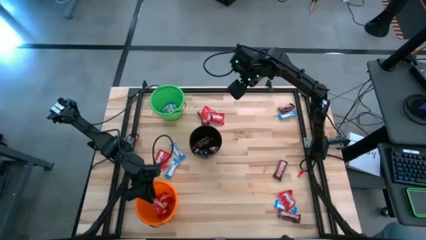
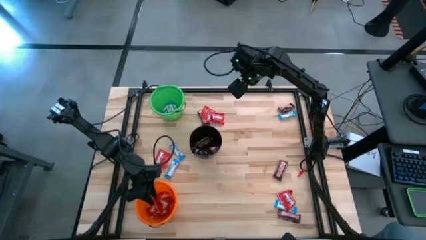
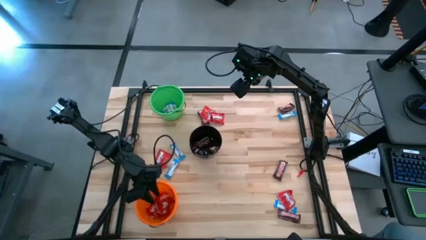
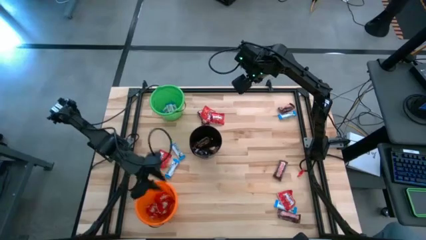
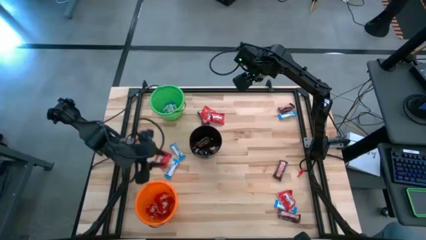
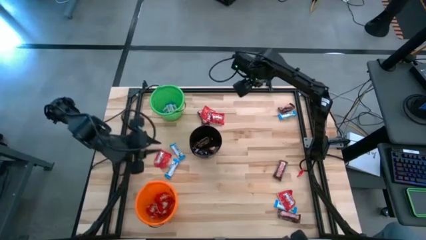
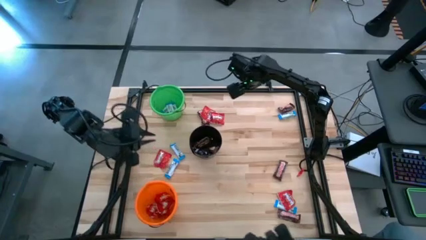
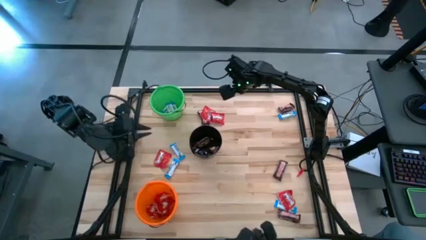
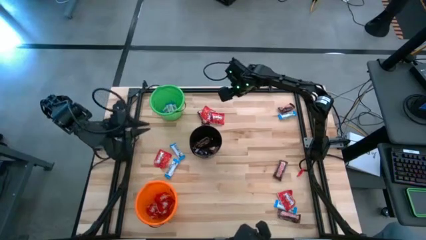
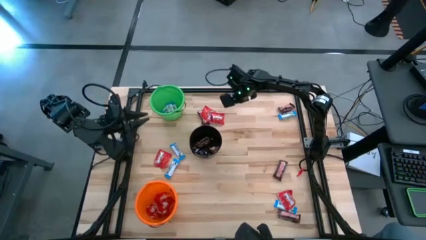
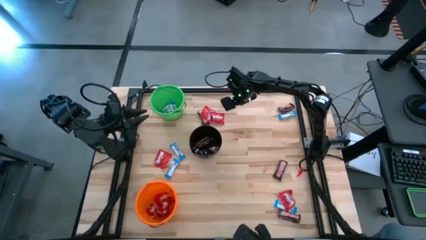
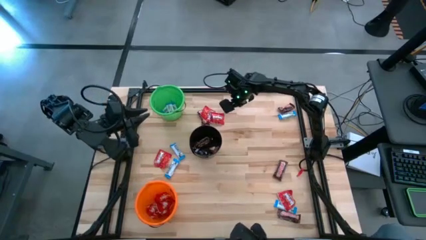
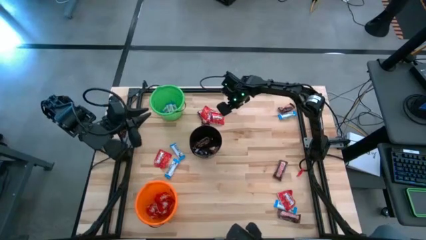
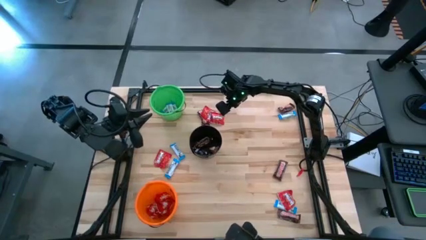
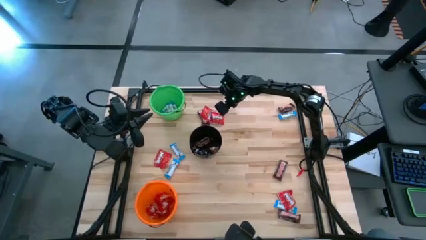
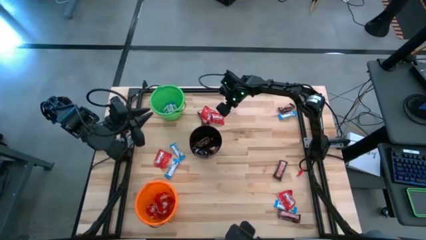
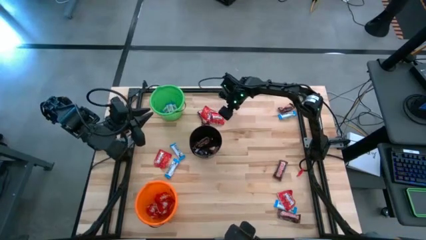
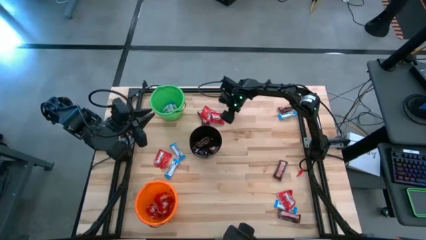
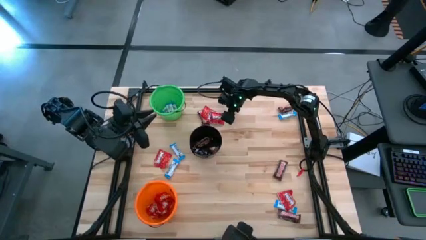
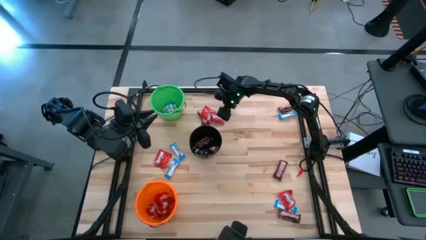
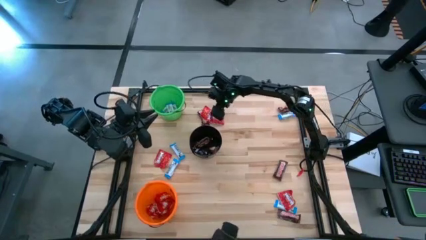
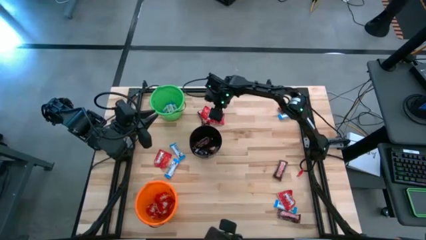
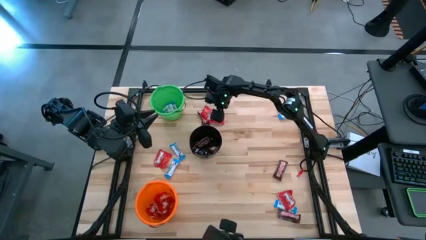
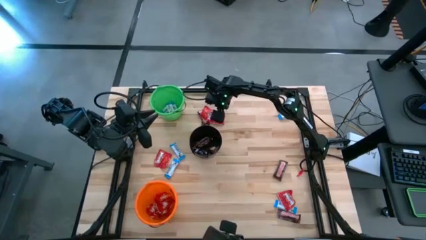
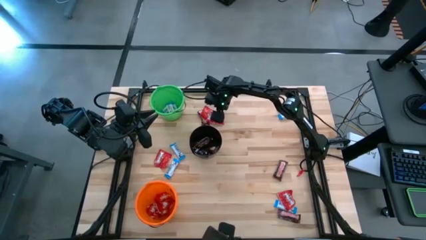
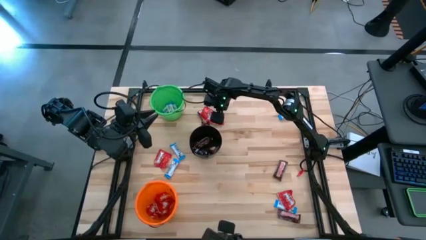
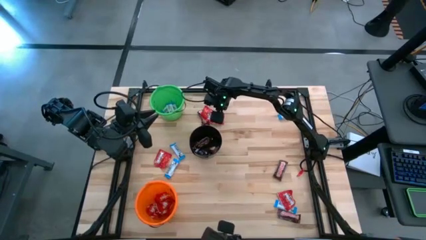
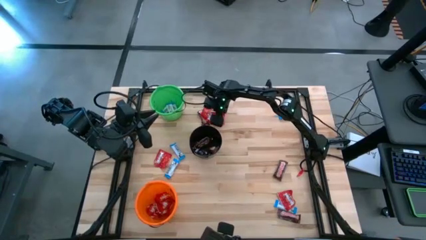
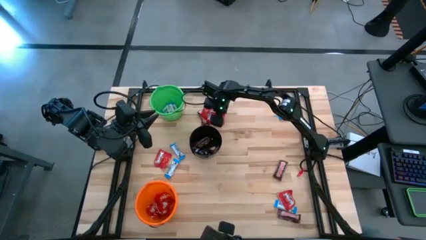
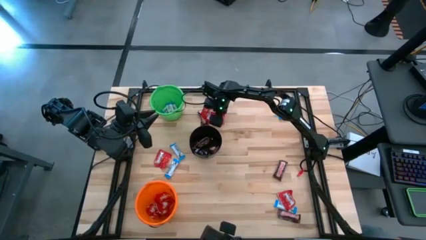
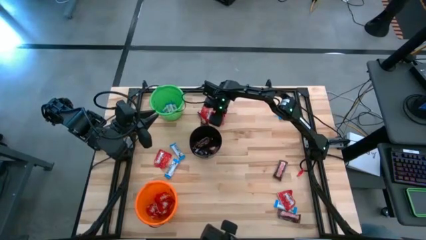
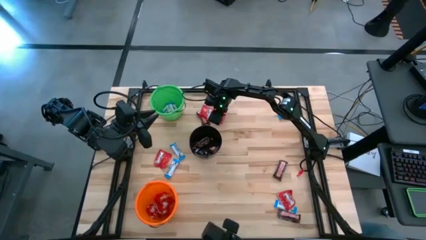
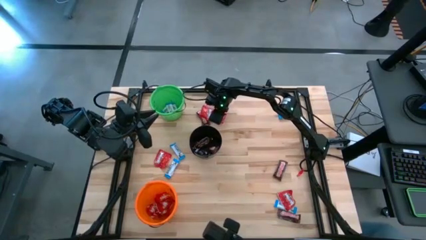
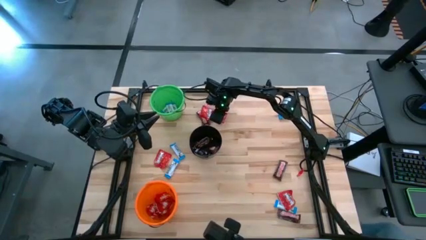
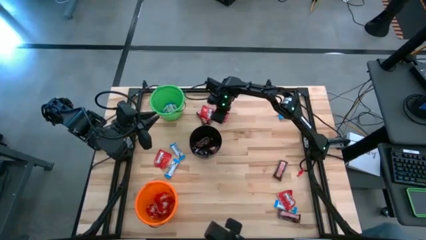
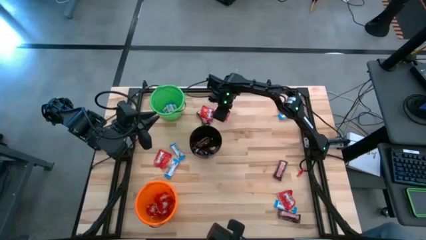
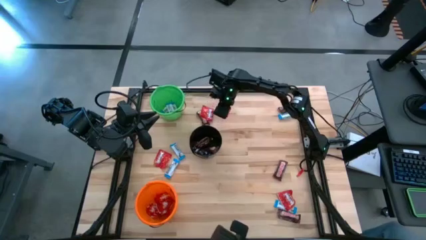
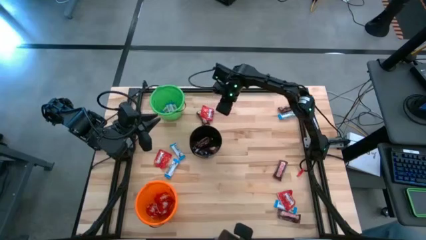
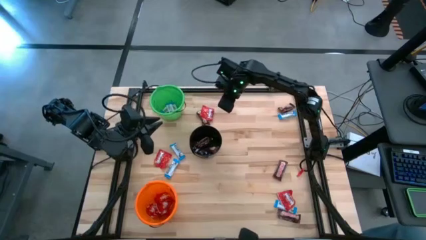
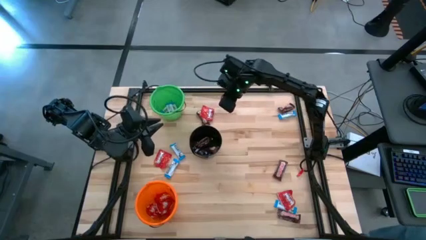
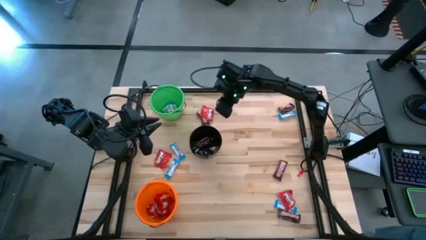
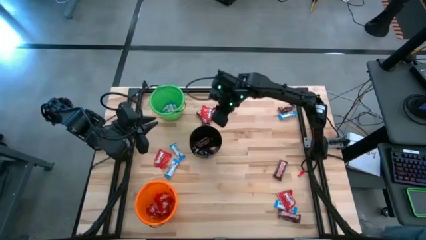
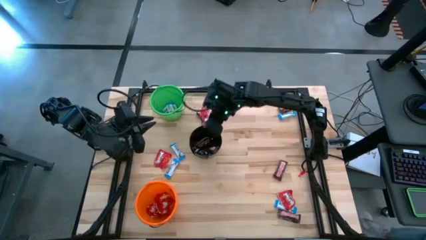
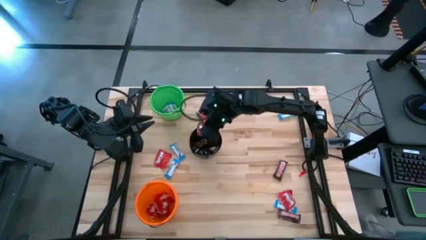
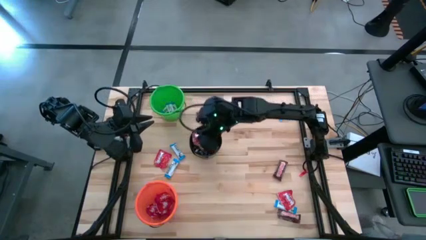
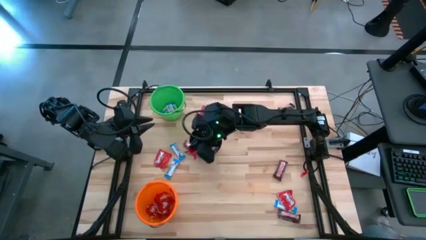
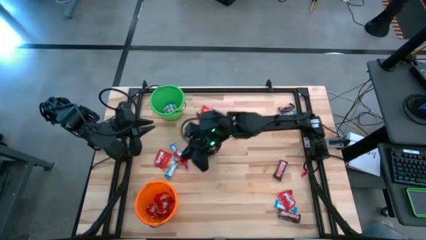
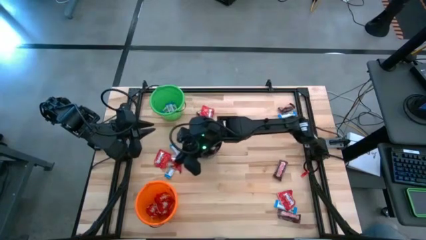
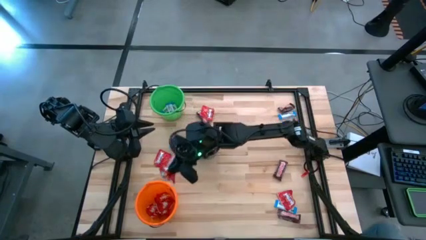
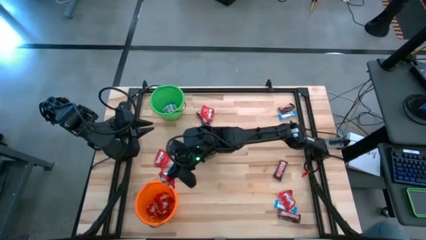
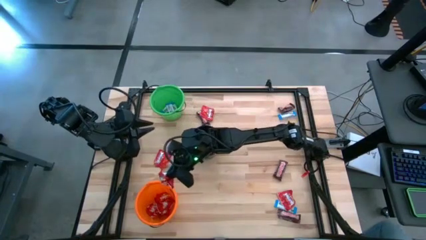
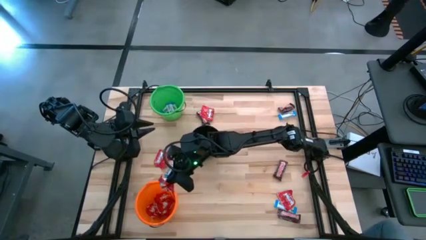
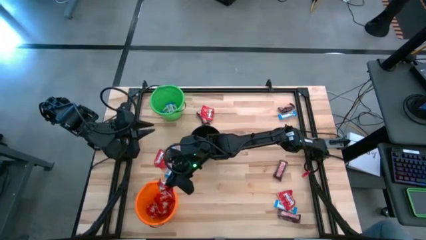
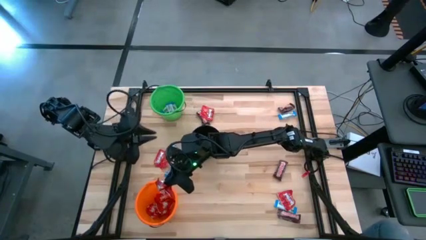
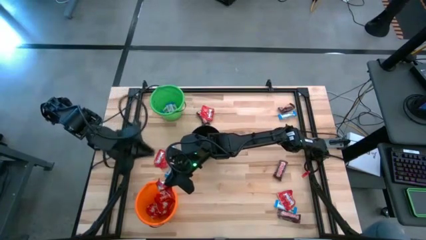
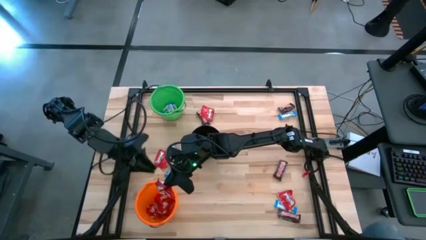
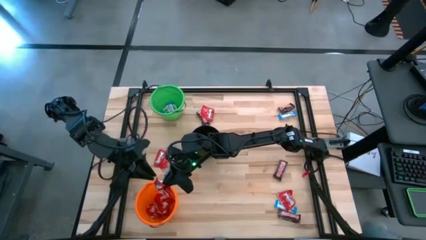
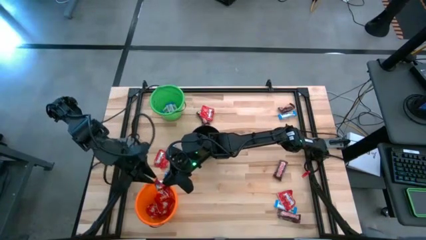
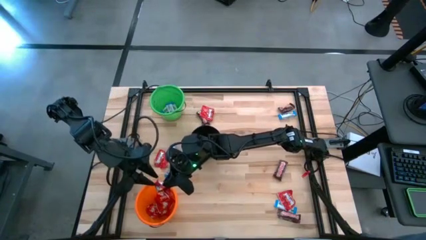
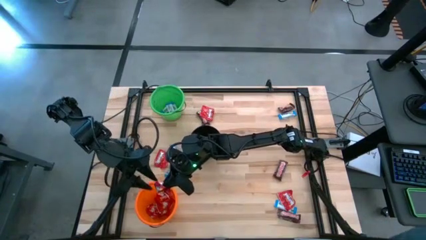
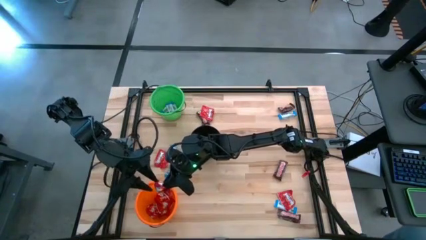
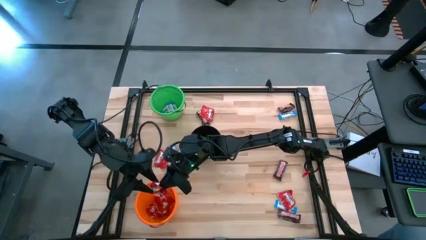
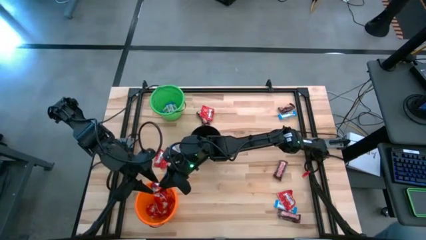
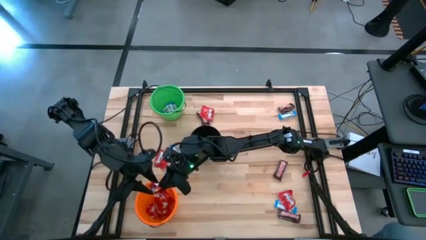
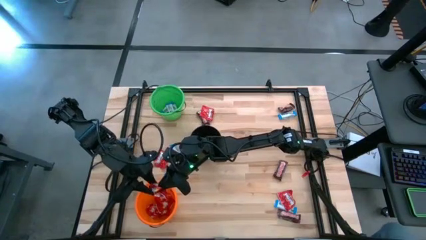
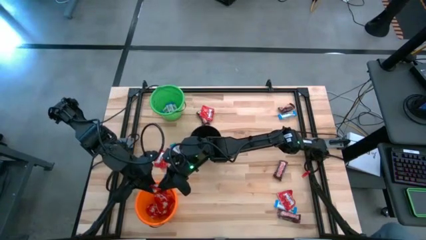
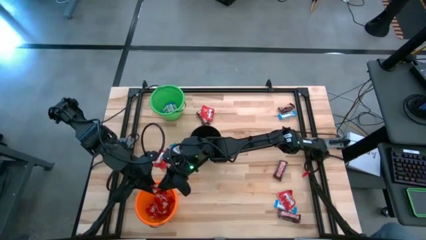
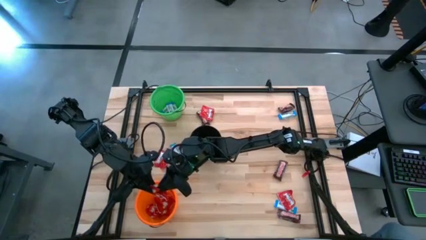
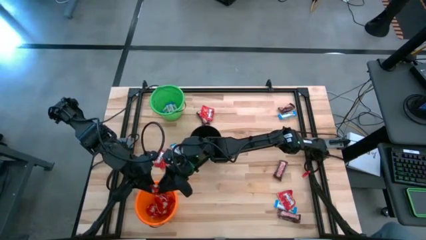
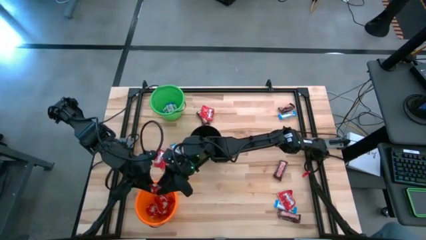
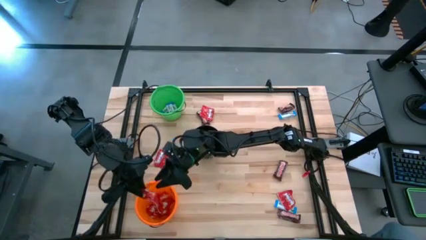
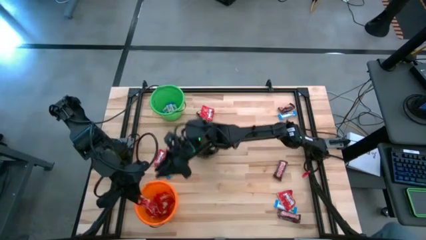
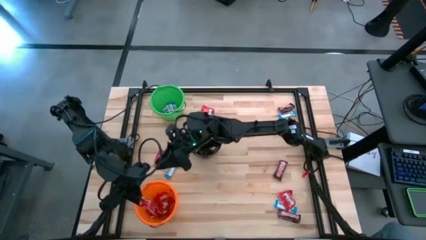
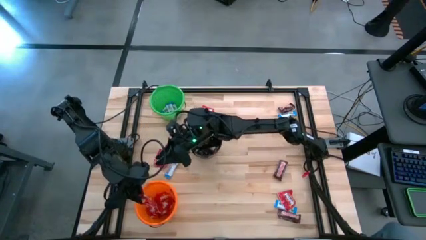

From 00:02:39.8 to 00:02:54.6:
Task: Sort candy
Put the red candy pack into the orange bucket

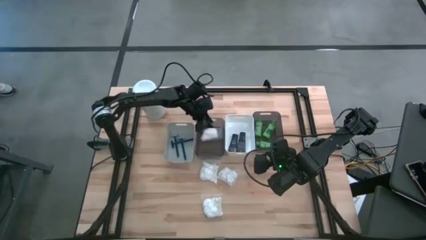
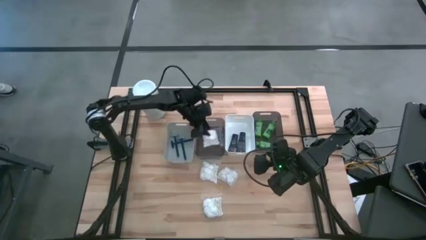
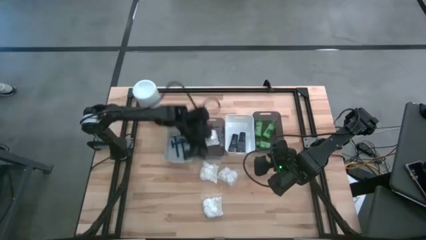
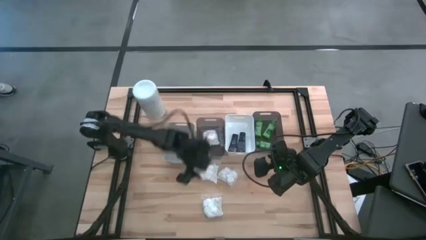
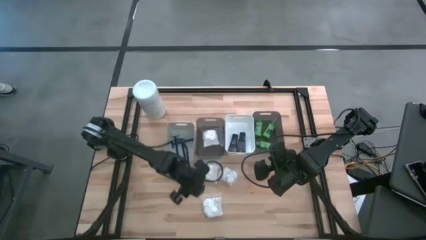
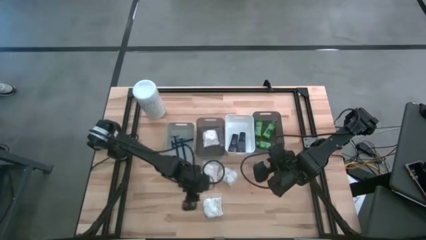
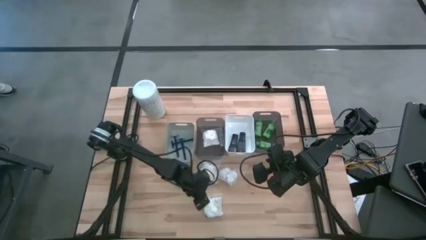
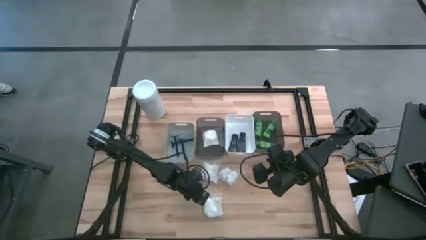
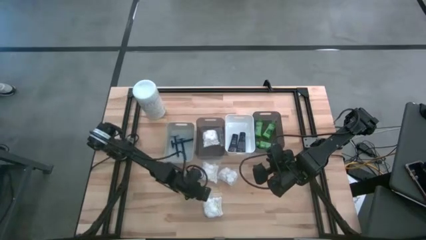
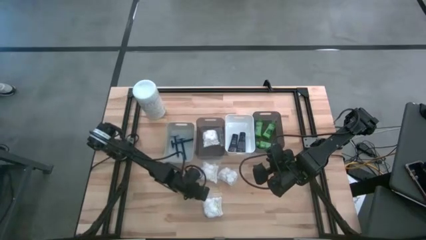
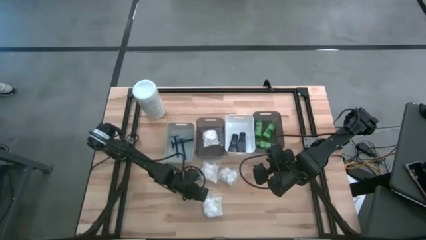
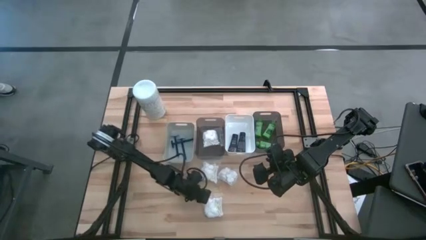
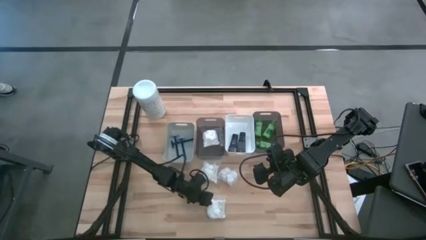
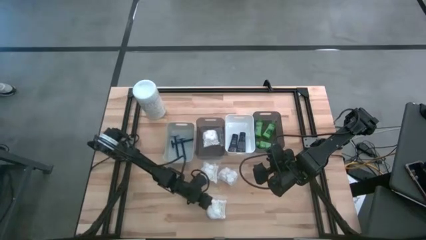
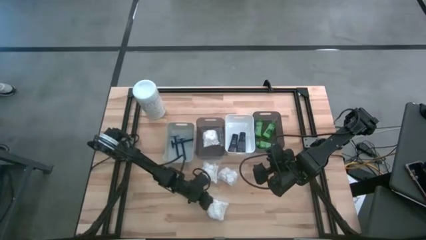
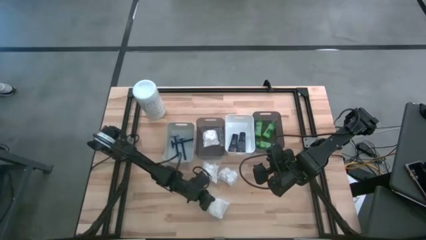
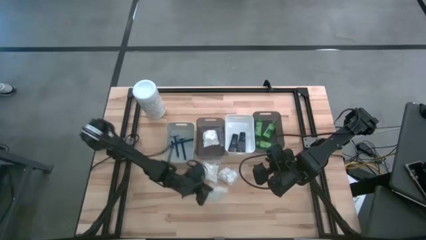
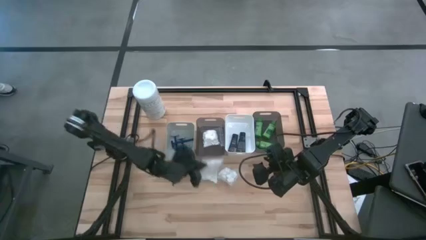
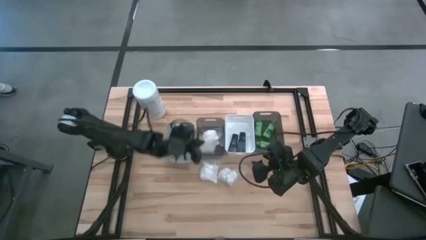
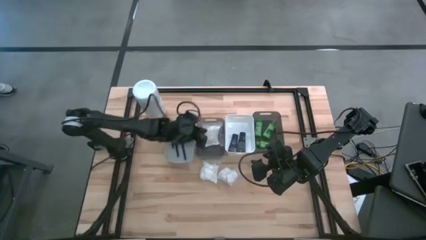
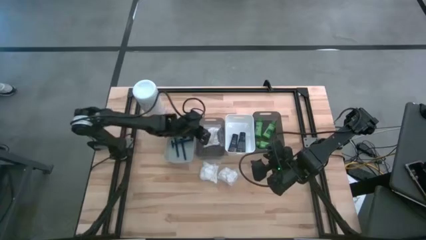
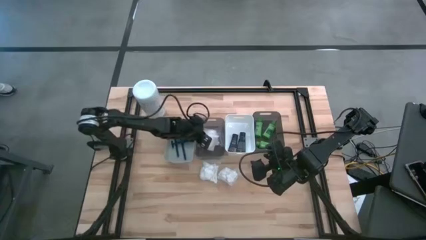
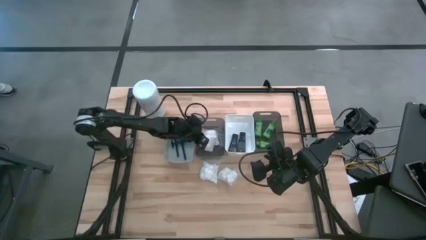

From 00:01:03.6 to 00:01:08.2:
Task: Pick & Place Travel size toiletries
Put the bottom cotton pack into the left black bin
